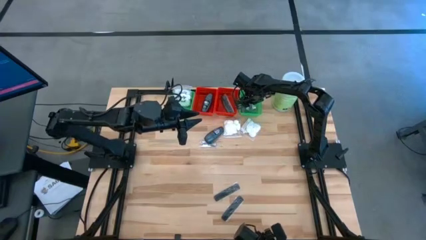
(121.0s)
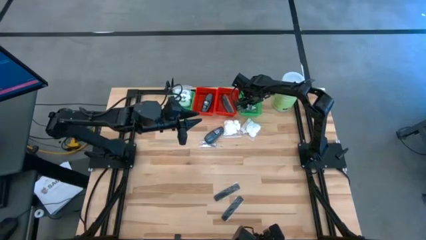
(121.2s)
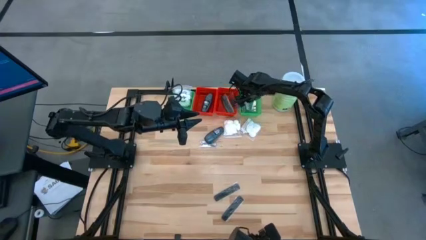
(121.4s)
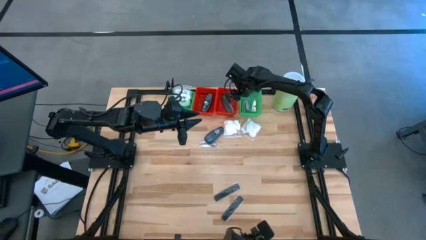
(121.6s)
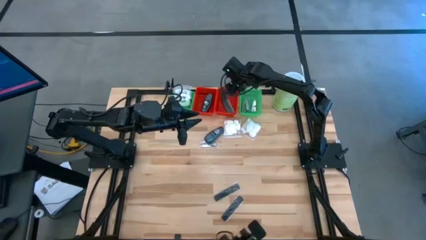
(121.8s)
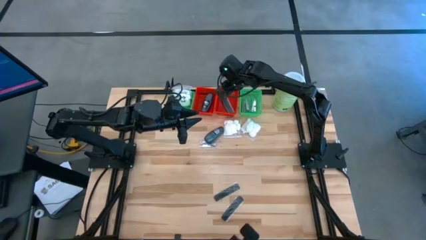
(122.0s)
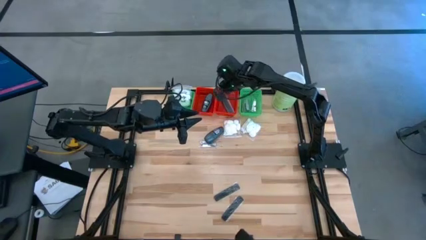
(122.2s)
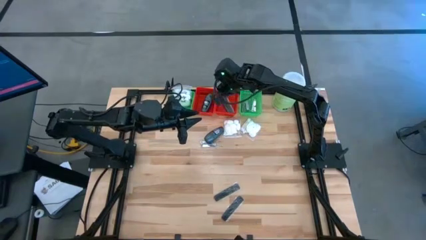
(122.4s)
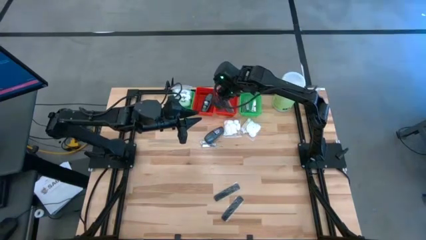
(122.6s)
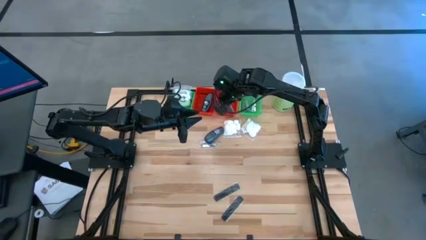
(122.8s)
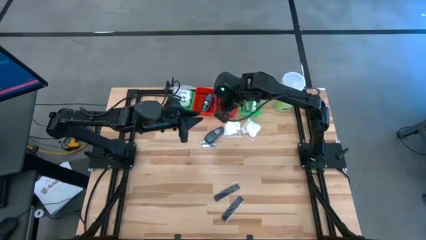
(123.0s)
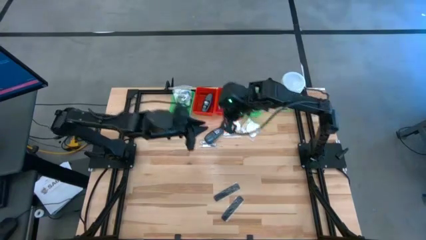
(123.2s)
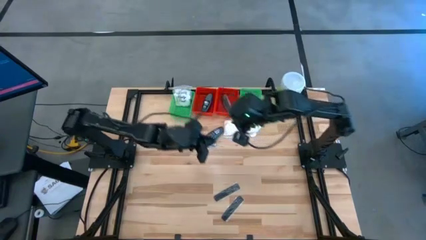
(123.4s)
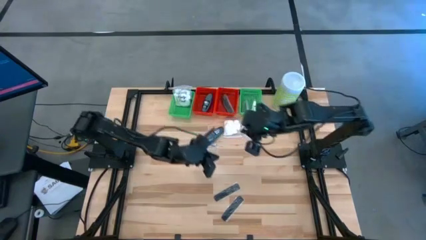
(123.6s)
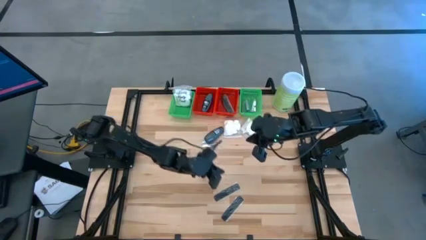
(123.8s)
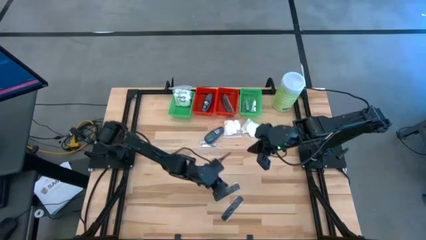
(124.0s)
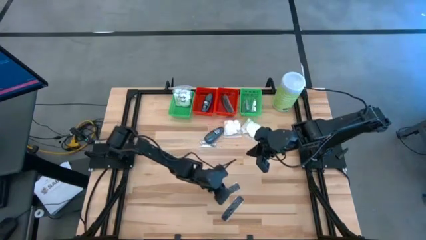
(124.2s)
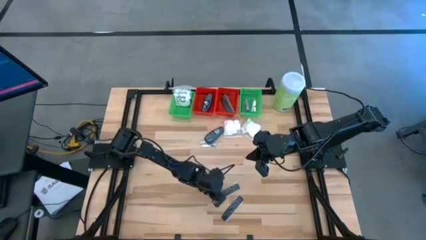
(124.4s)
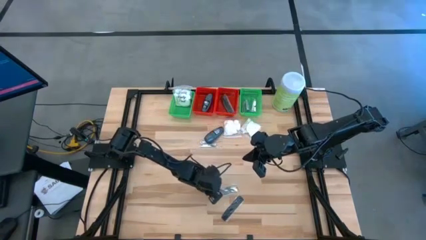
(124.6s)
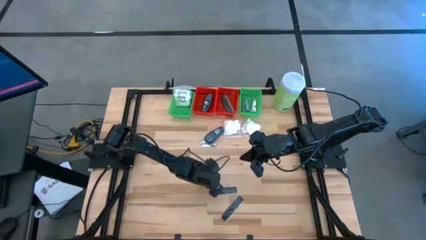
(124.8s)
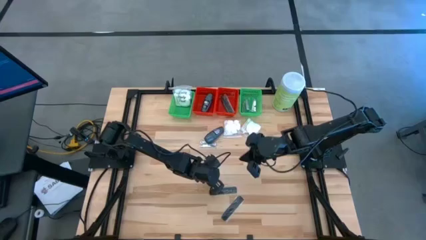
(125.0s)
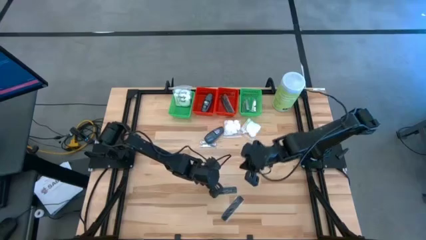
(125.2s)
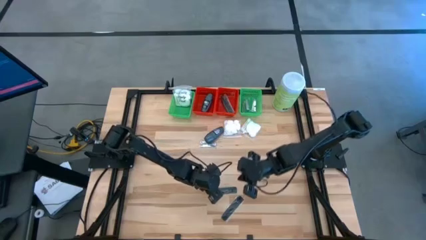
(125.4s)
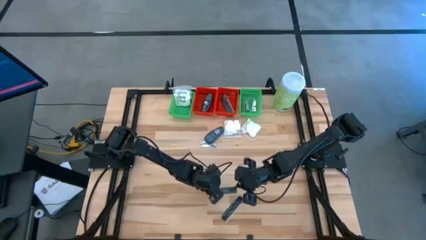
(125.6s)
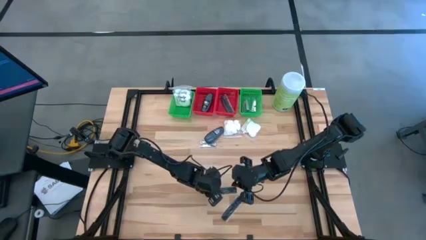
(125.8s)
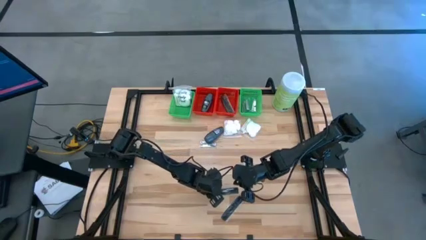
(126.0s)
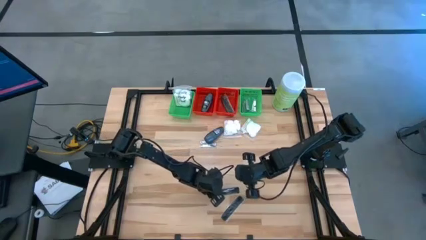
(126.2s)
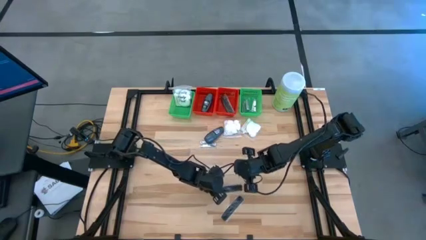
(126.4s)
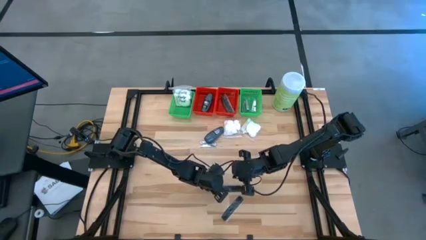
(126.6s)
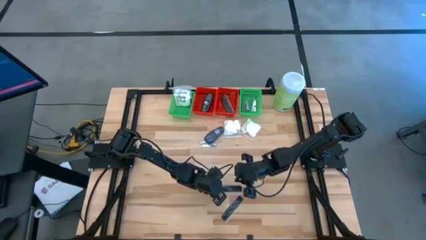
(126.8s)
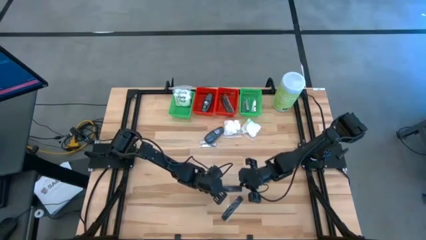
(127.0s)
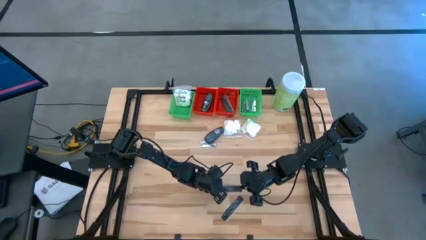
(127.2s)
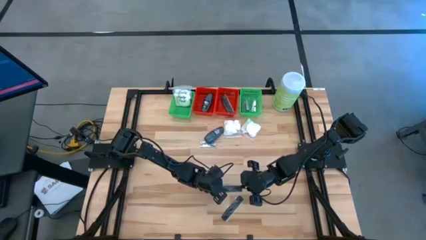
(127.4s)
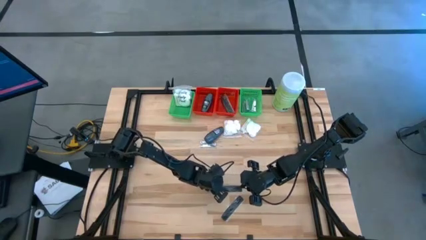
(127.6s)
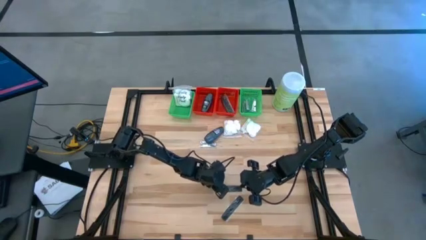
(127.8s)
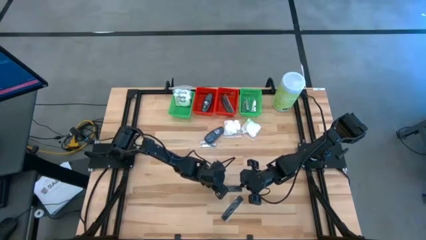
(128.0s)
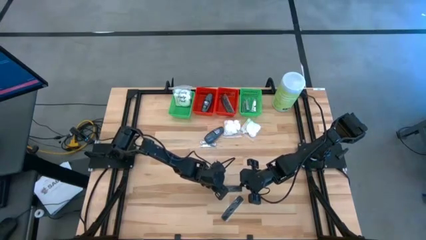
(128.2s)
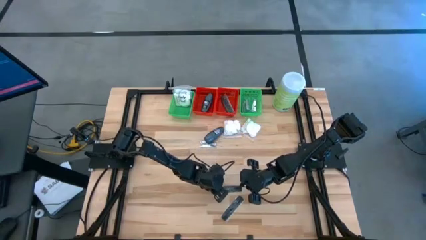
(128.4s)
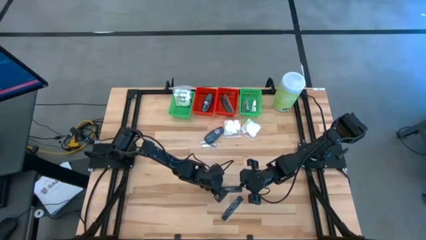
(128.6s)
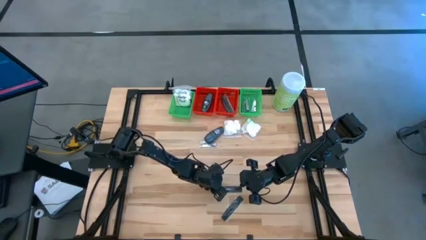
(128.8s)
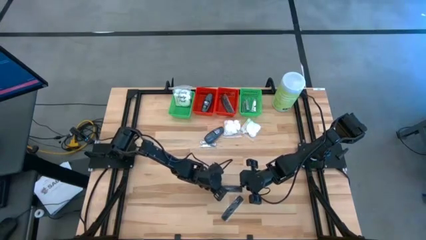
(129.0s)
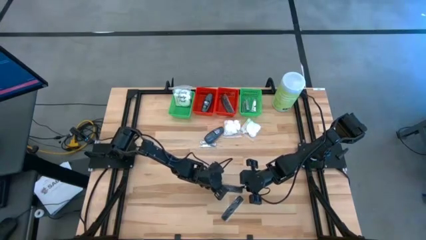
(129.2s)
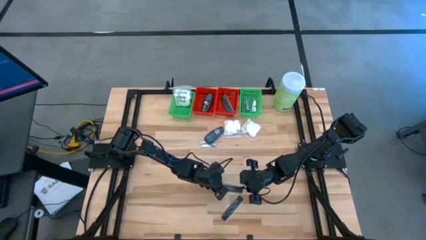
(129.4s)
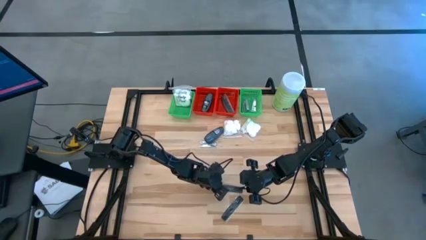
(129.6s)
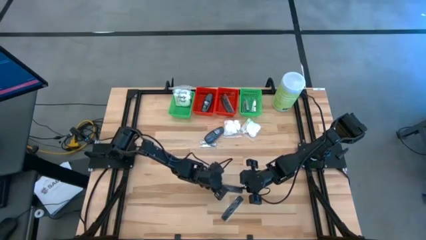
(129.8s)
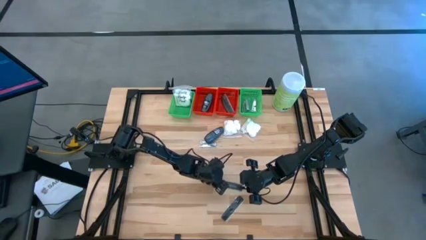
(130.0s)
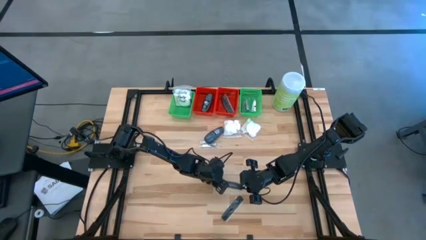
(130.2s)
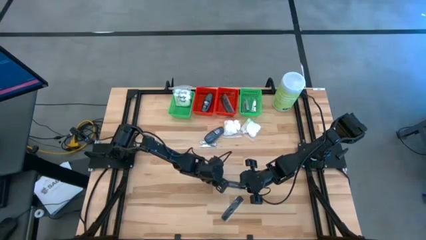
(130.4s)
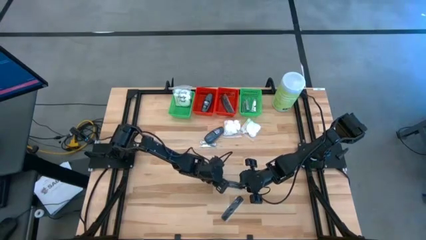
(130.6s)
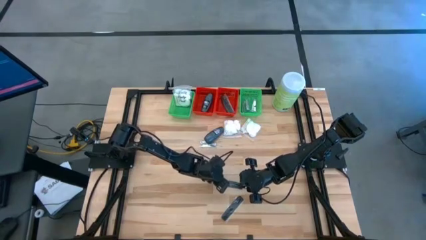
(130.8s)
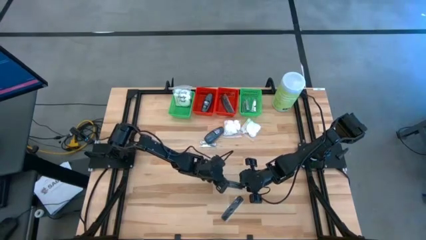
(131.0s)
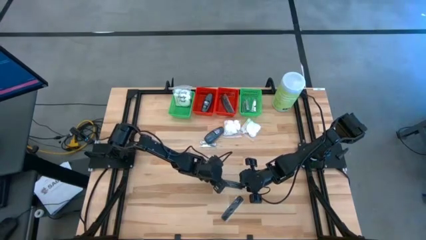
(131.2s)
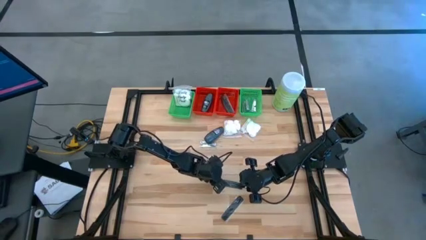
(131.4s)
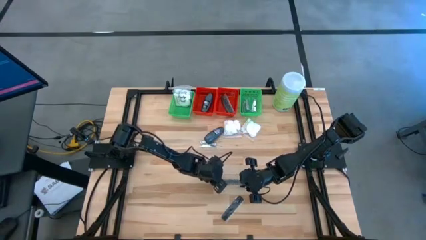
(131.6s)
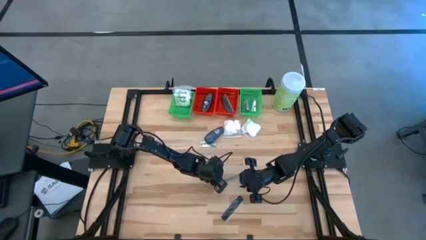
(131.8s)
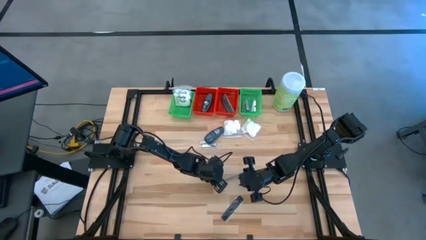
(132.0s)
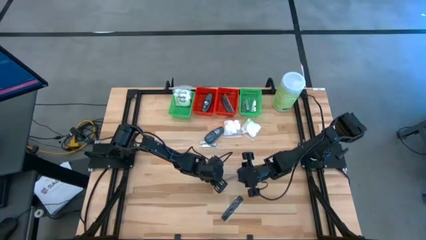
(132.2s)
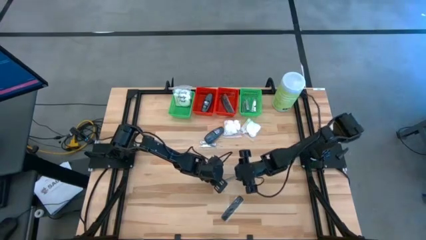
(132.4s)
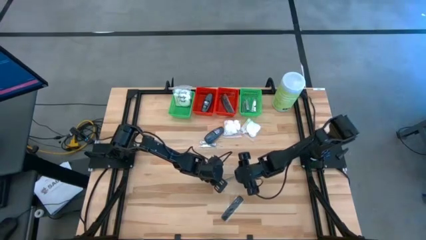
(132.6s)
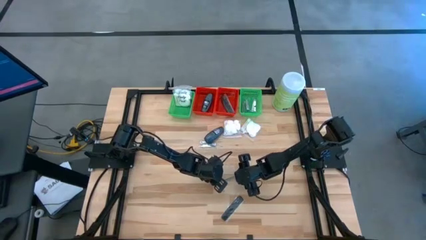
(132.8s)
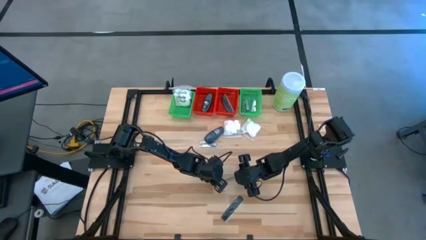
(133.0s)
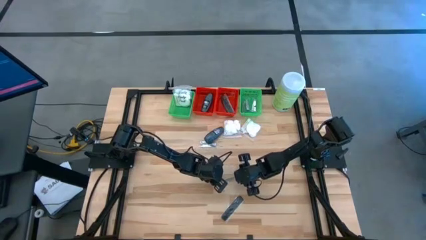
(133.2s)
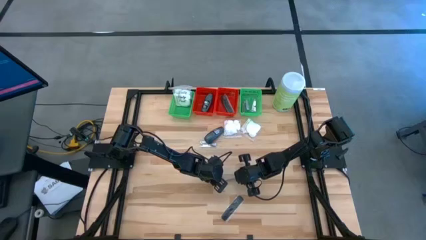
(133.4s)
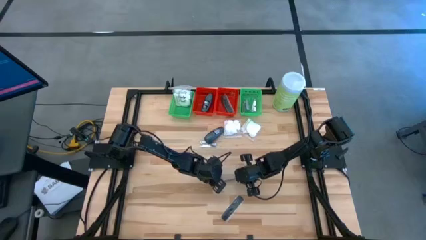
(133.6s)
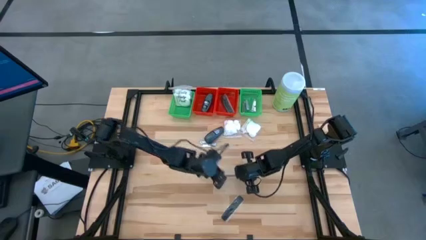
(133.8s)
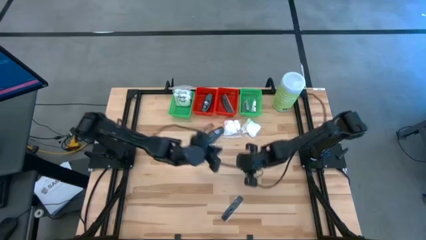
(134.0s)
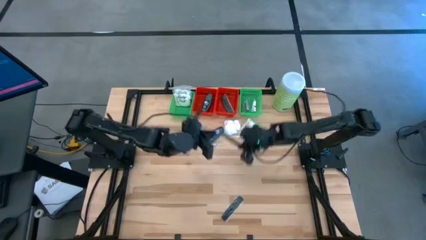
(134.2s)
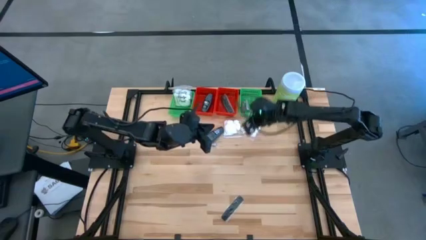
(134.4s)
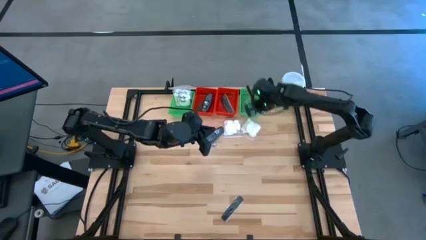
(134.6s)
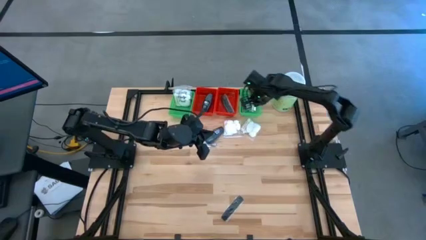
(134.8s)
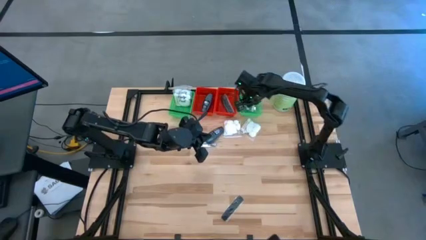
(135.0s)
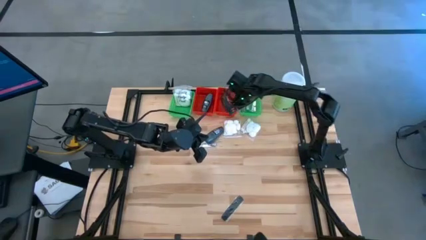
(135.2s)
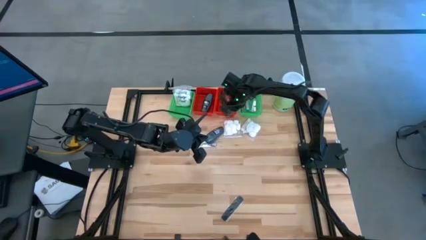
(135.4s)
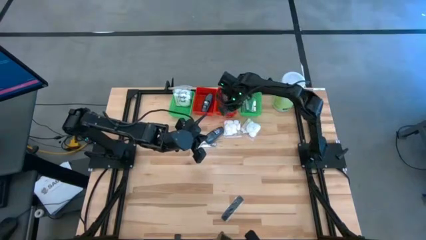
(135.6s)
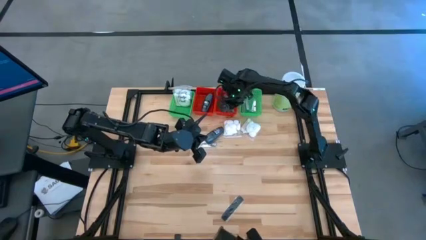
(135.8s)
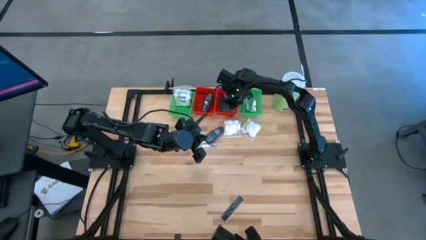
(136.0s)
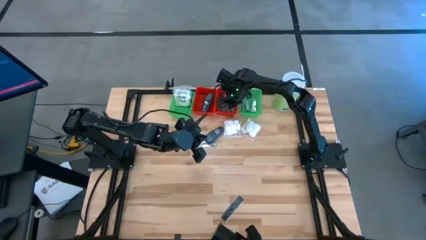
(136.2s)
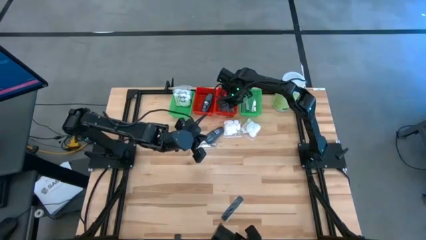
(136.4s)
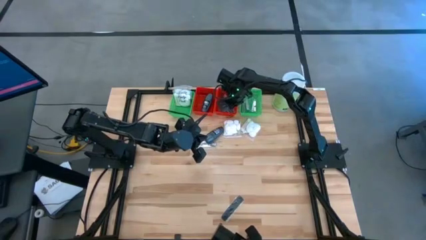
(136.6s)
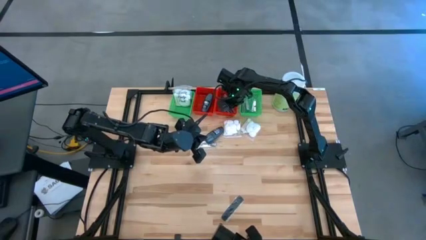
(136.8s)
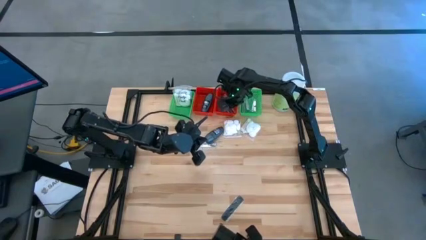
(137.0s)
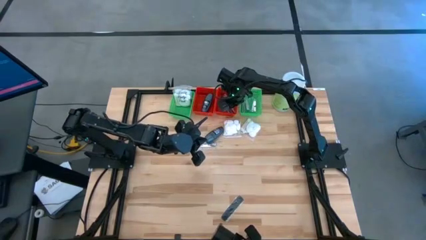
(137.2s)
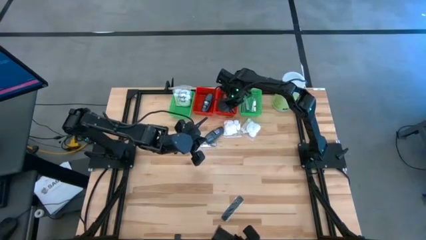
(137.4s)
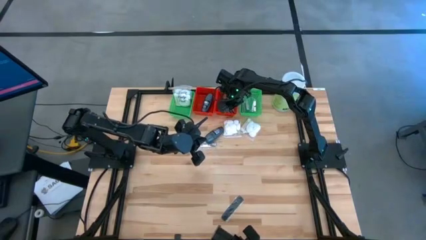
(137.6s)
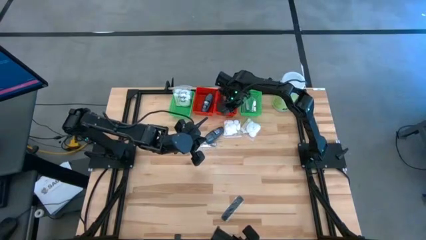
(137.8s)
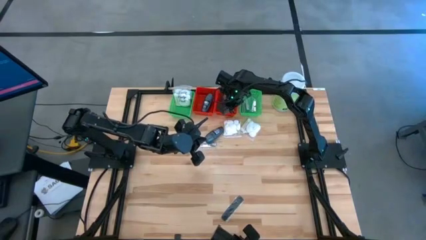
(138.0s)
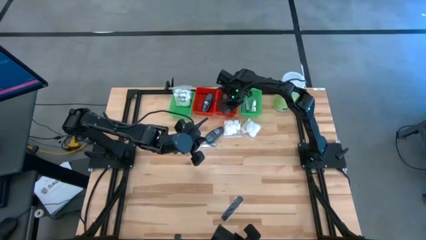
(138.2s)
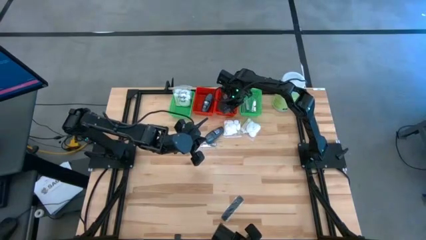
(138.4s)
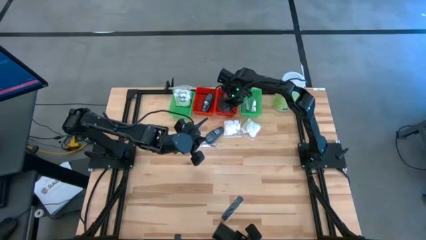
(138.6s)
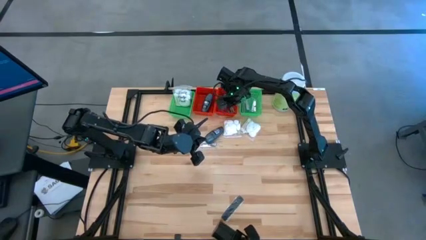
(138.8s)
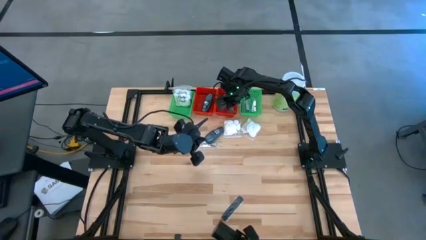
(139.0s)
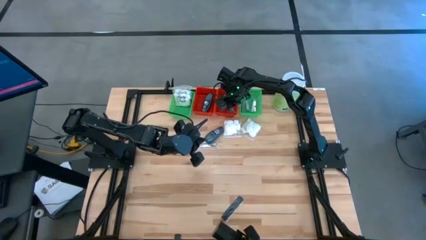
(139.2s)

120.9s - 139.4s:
Task: Pick & Place Travel size toiletries
Put the comb into the right red basket
